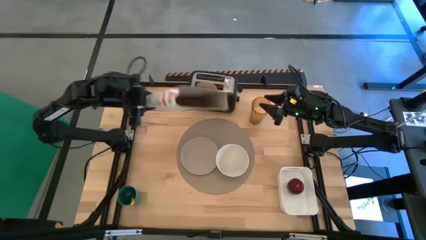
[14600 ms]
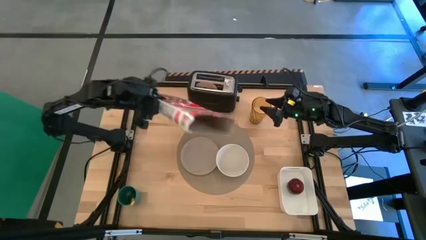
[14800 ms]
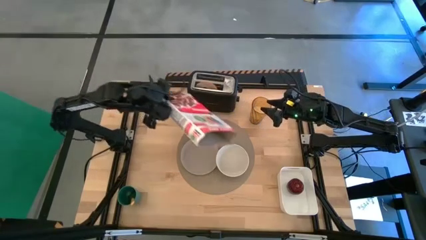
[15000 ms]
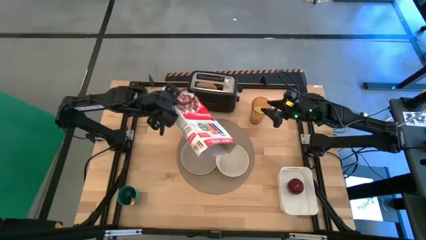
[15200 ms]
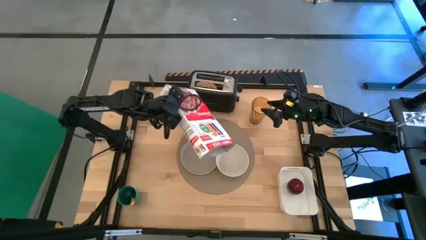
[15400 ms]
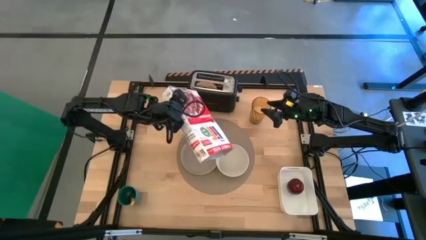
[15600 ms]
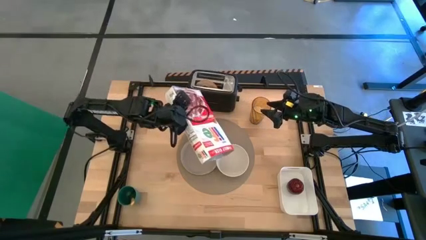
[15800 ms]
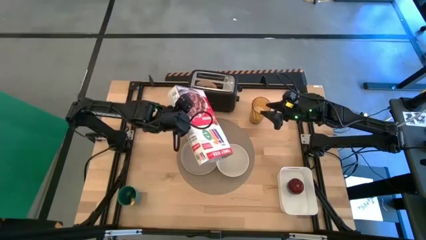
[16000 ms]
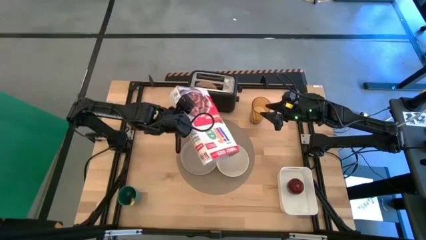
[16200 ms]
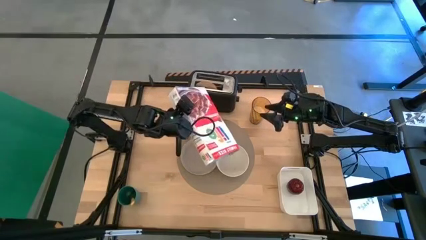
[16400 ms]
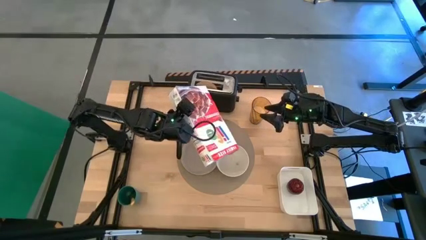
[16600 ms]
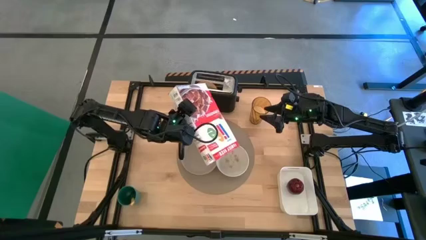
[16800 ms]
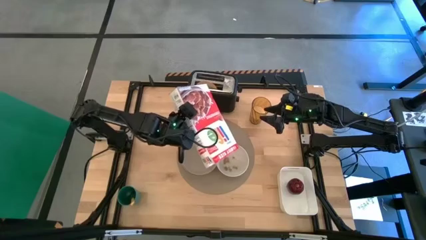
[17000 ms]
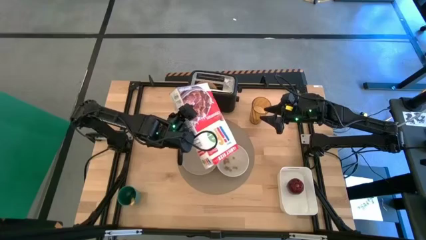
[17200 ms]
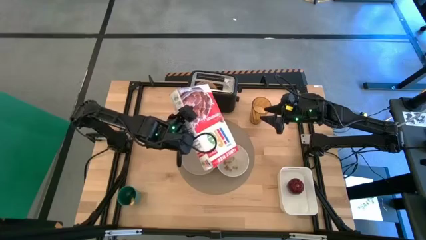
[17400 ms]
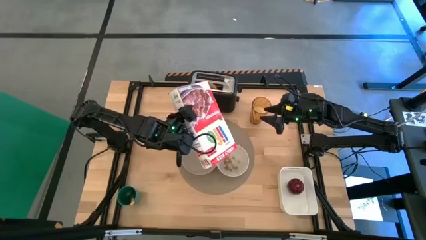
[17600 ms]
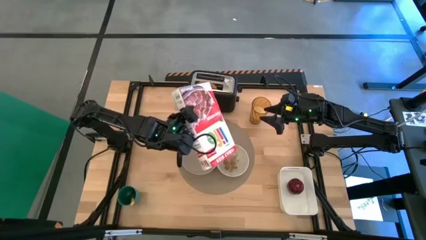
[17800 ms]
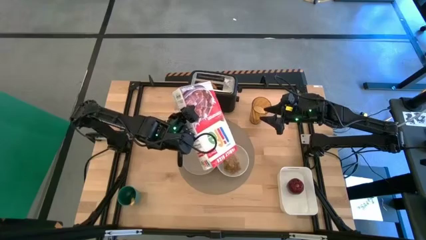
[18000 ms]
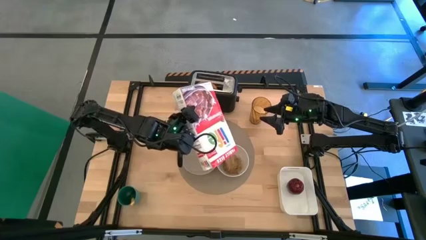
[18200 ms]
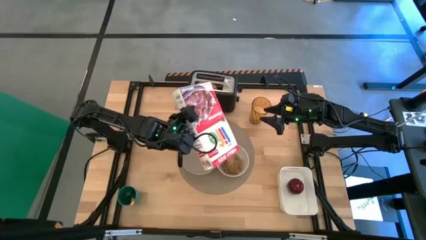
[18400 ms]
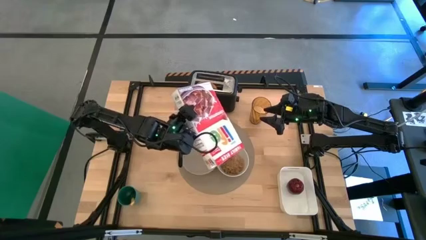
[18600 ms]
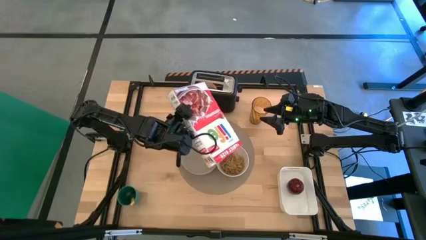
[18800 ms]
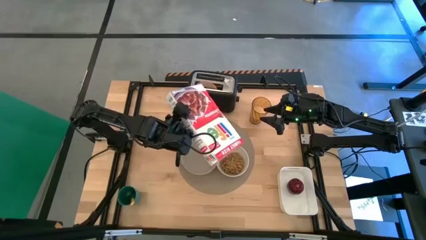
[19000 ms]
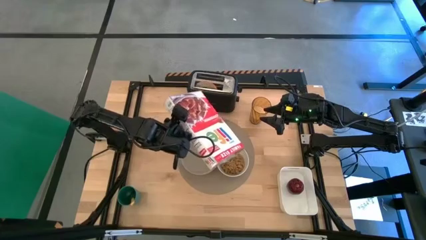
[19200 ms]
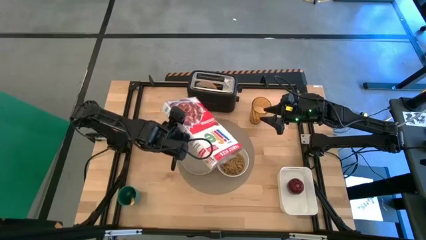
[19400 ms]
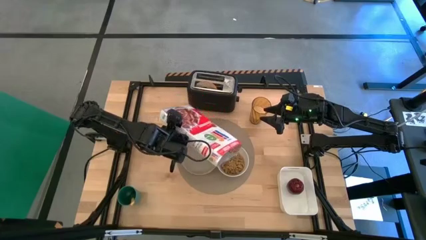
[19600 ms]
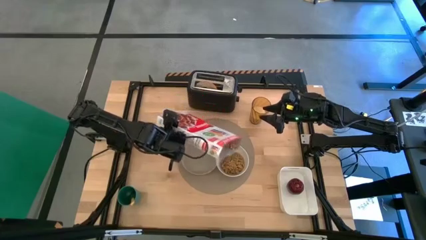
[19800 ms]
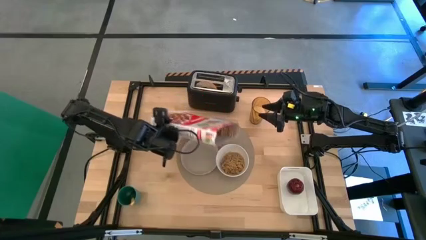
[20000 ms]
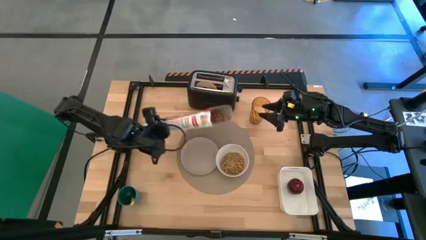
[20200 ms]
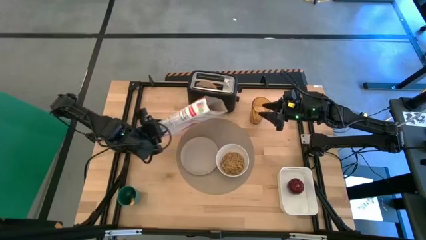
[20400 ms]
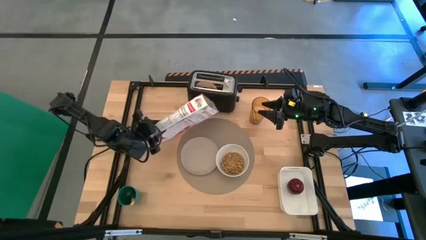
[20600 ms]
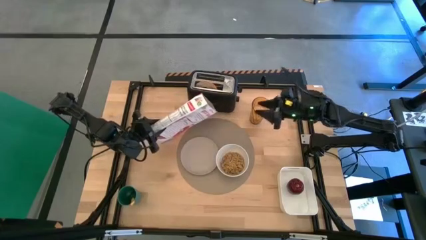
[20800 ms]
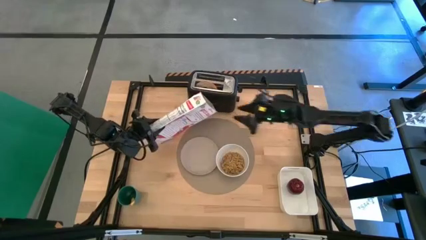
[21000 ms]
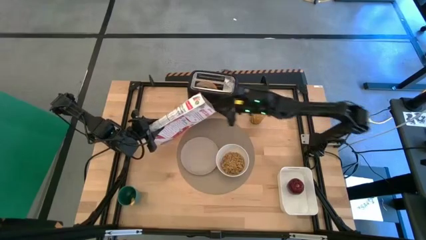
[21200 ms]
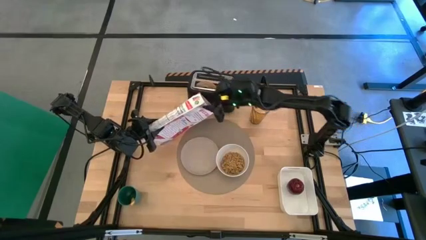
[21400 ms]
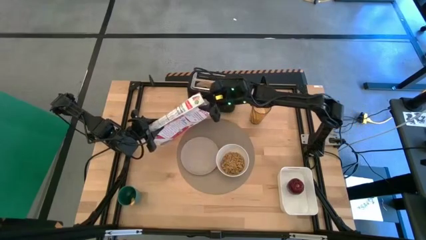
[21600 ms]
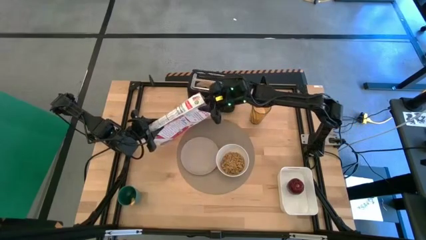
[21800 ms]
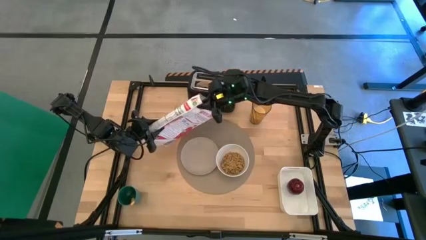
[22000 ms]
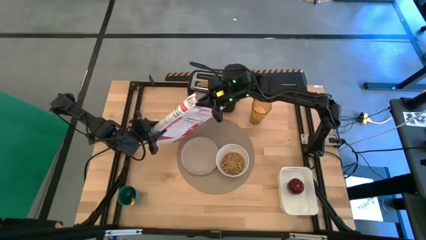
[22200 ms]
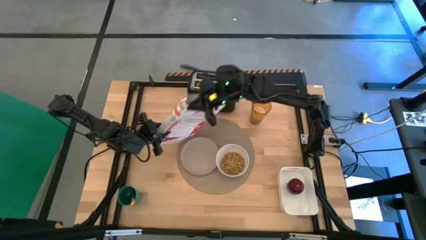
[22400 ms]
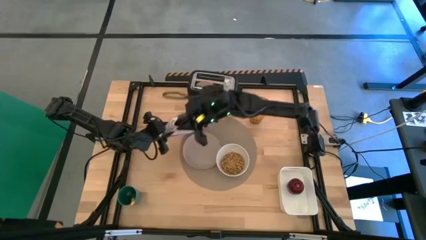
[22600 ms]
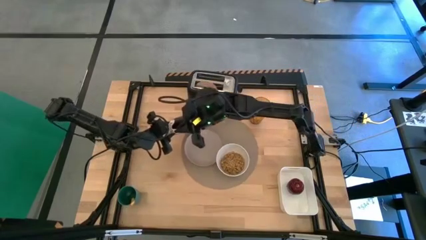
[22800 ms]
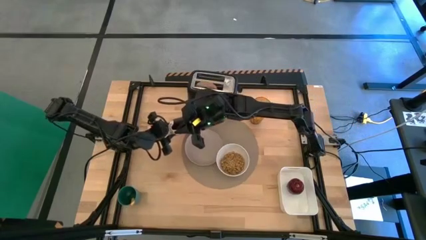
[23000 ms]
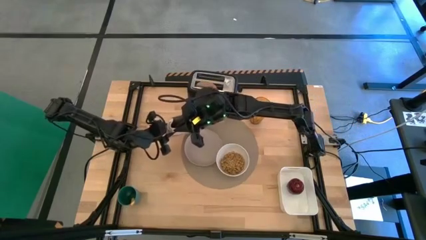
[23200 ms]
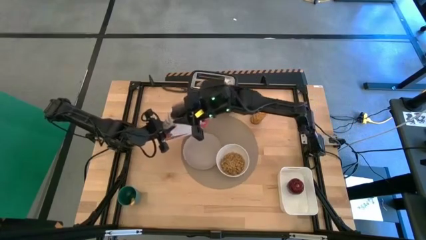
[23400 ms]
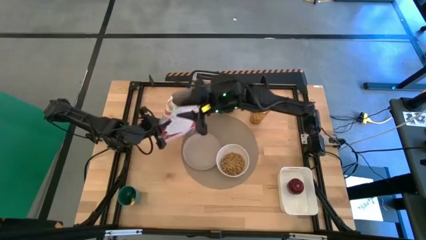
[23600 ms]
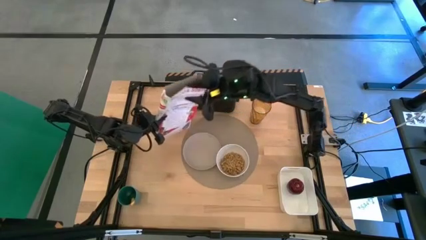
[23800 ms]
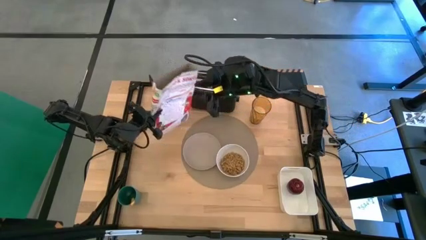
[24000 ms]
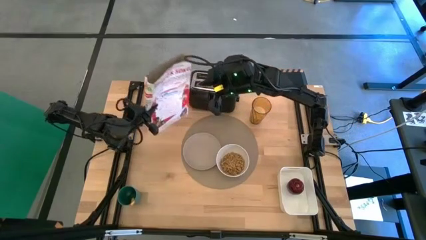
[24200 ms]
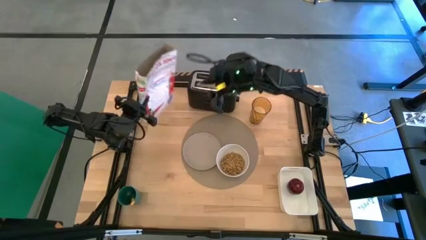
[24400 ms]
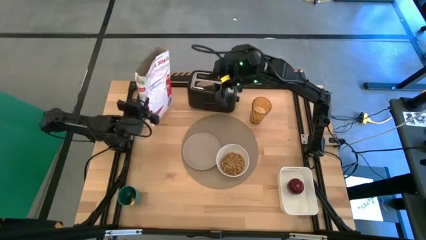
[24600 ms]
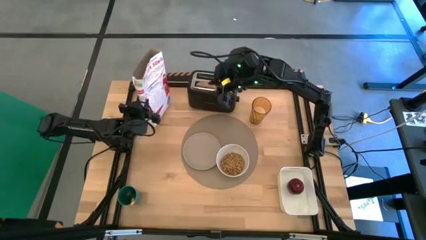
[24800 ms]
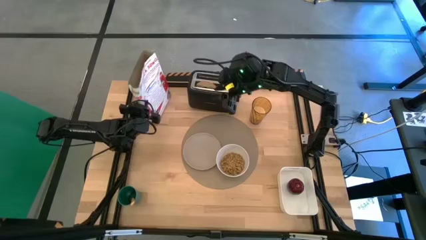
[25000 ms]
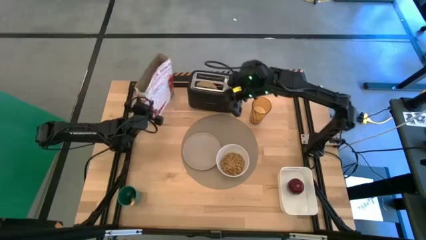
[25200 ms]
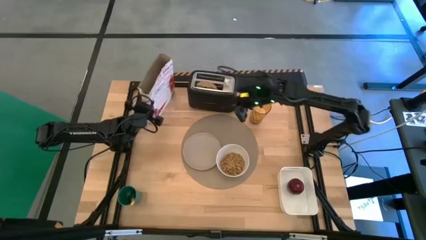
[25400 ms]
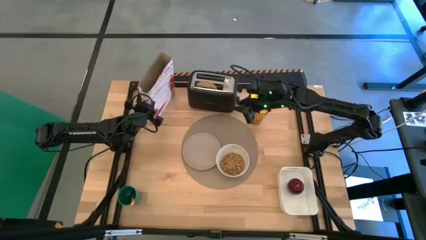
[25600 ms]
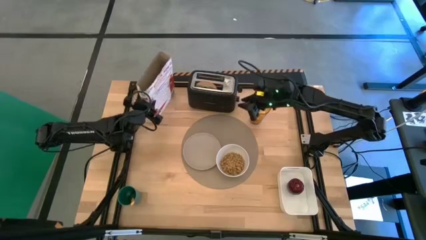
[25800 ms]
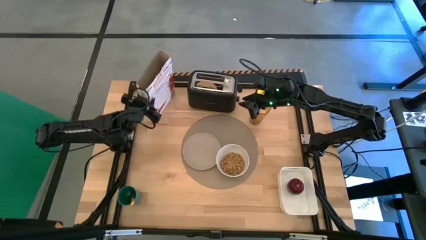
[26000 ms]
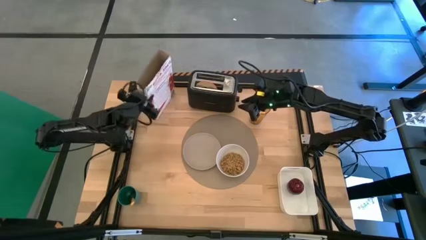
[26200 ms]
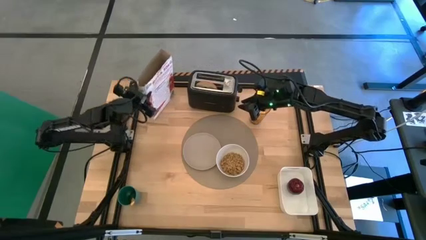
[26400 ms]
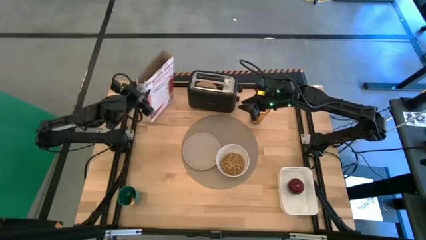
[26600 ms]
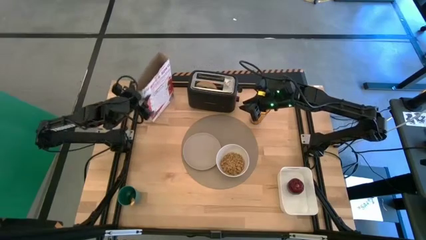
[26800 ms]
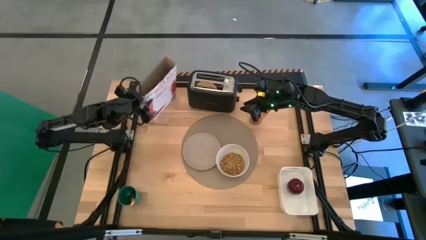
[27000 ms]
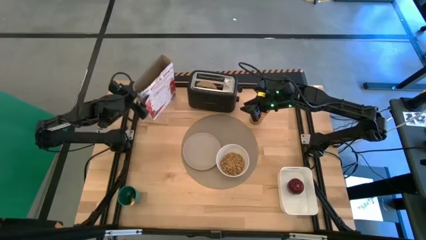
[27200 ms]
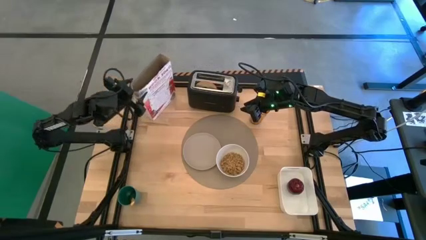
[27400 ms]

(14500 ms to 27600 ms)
Task: Arrange a breakfast setting
Pour the cereal into the white bowl

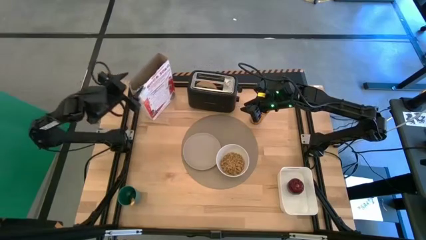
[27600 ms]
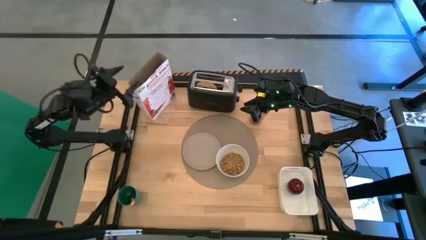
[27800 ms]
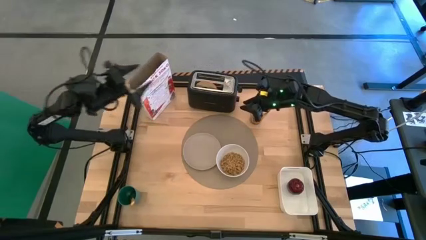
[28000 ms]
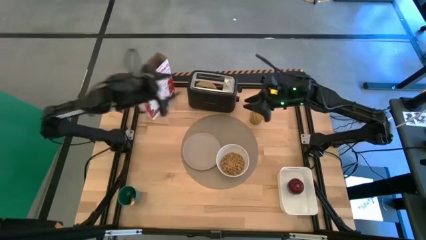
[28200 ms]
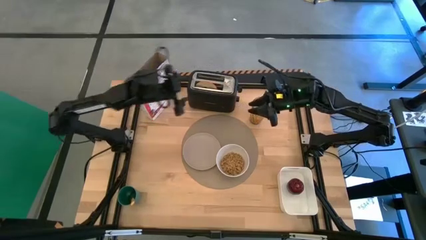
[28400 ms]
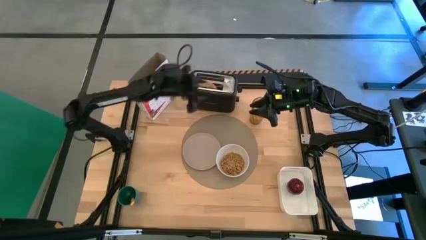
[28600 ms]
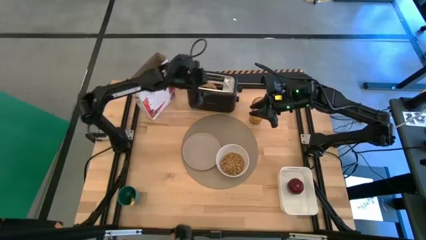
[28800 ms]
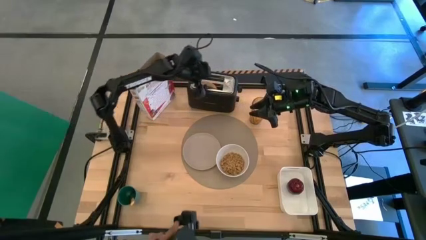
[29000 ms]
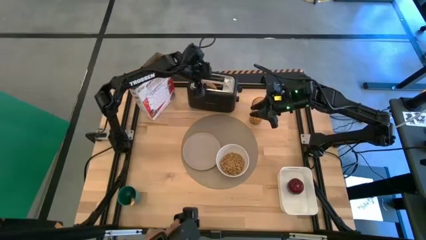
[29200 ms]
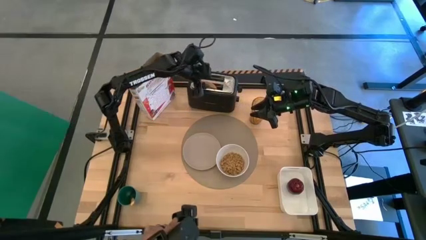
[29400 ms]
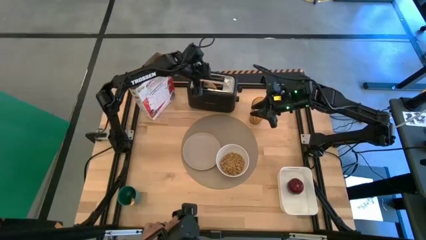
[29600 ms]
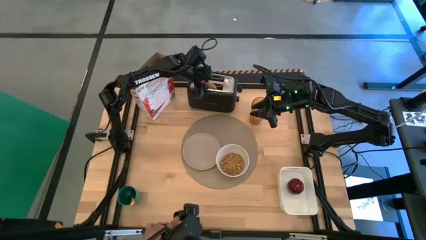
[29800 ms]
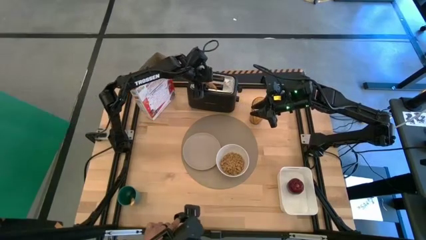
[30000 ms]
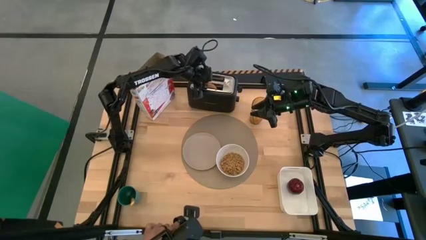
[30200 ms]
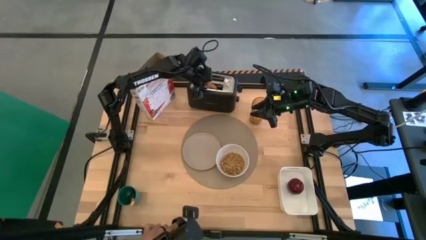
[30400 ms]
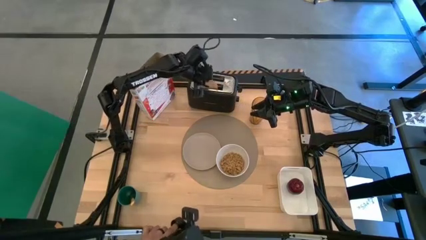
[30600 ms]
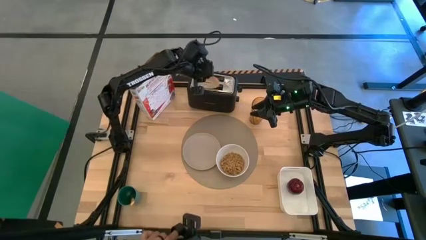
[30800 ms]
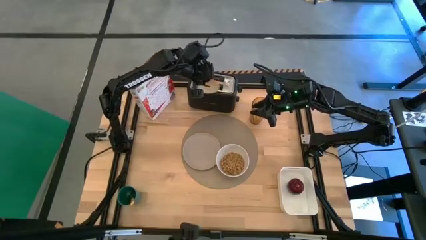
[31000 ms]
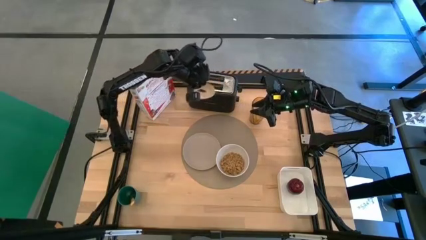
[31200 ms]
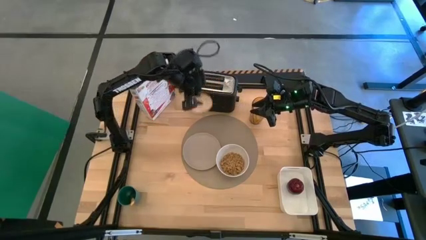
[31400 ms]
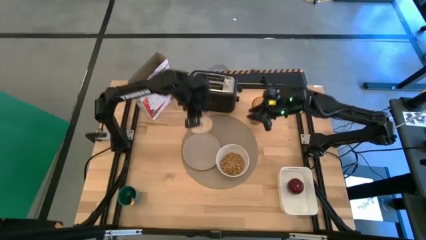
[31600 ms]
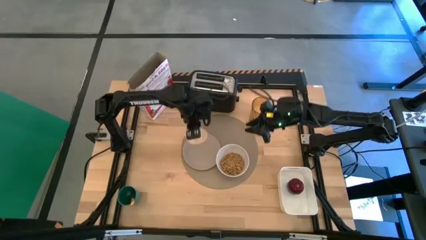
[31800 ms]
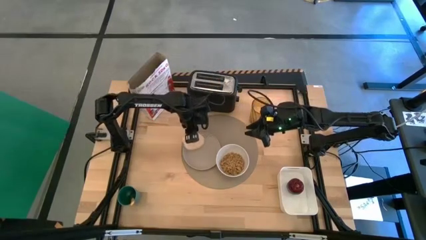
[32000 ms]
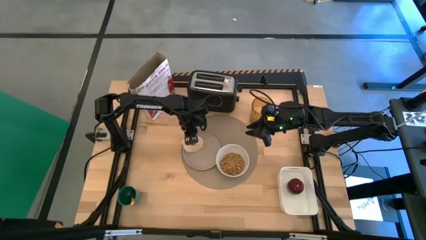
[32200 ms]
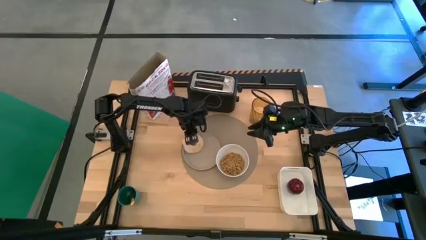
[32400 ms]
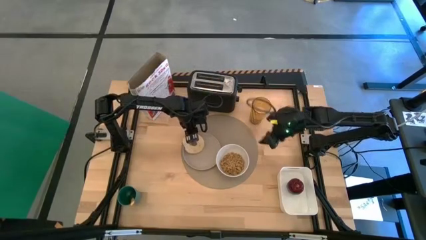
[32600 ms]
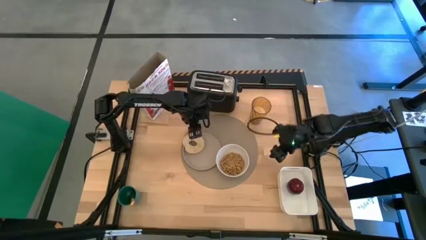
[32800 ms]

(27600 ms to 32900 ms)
Put the toast bread on the gray plate
